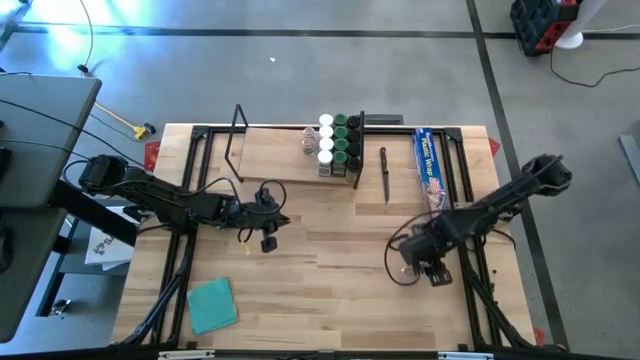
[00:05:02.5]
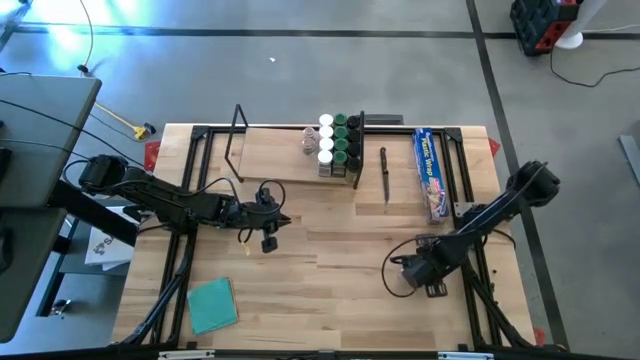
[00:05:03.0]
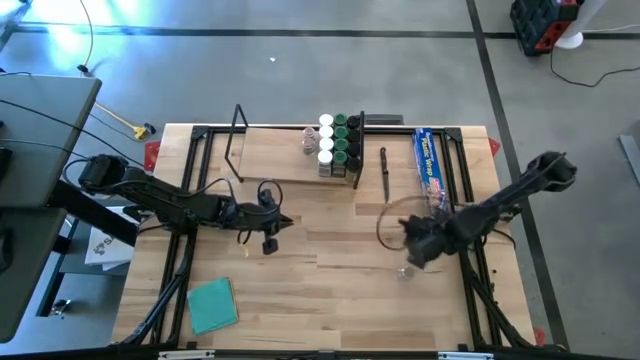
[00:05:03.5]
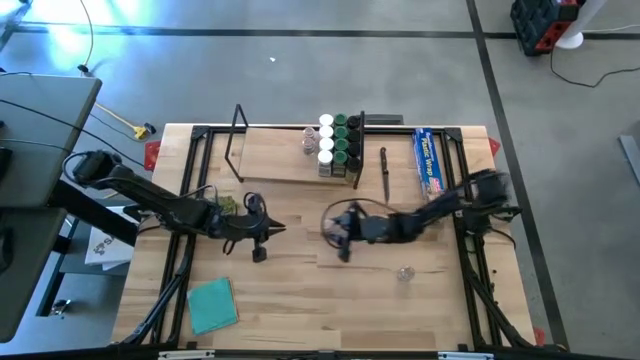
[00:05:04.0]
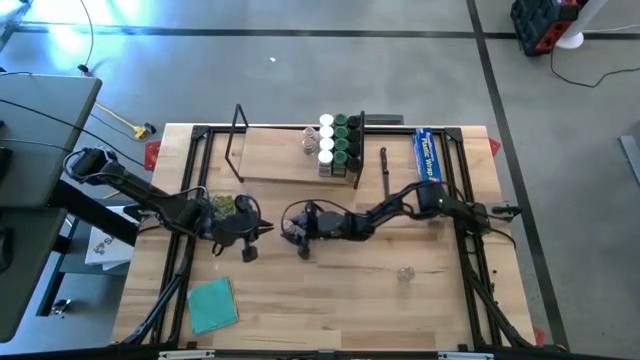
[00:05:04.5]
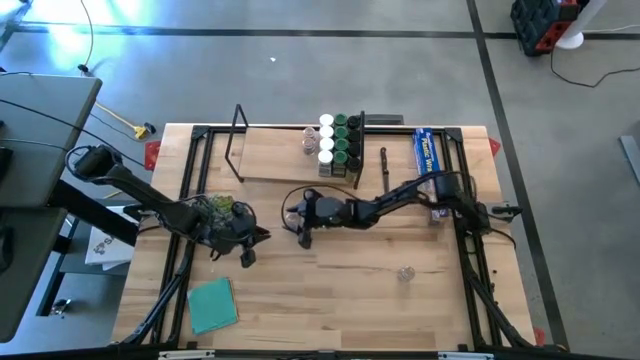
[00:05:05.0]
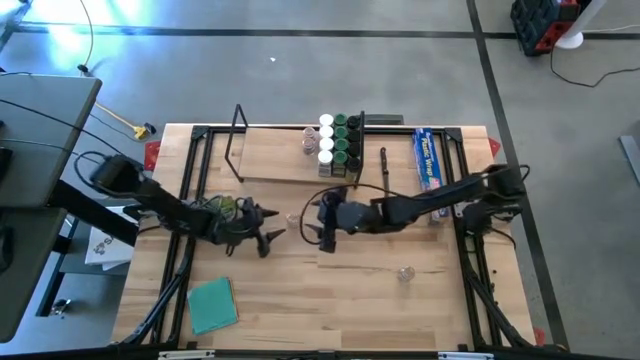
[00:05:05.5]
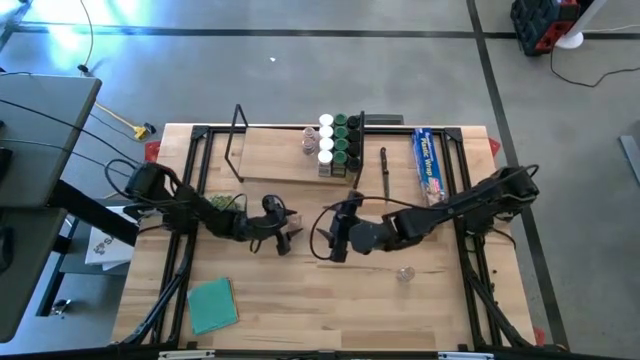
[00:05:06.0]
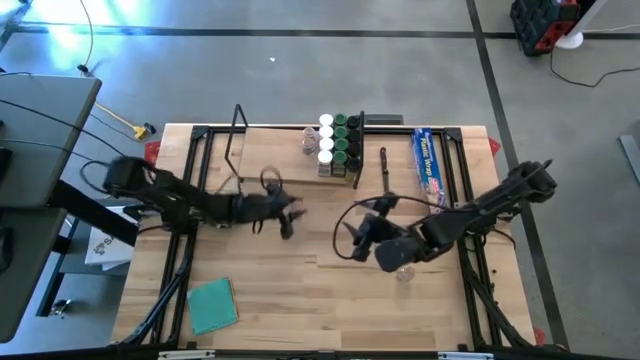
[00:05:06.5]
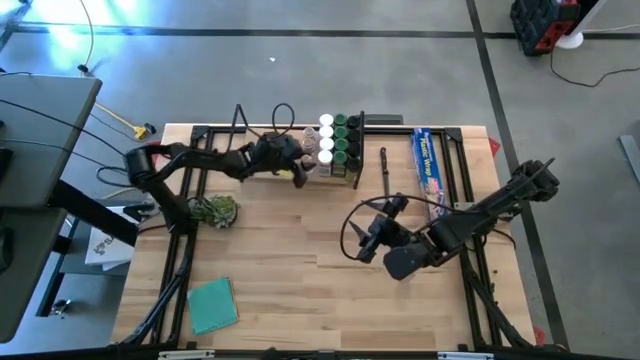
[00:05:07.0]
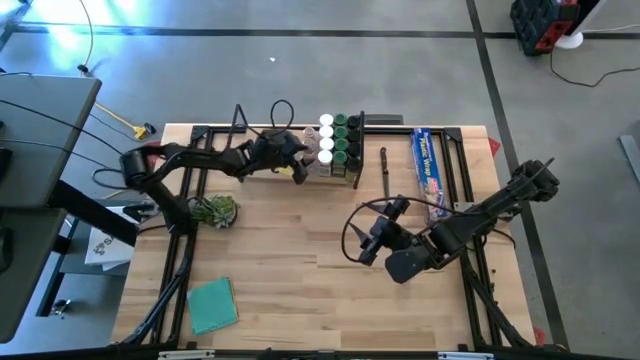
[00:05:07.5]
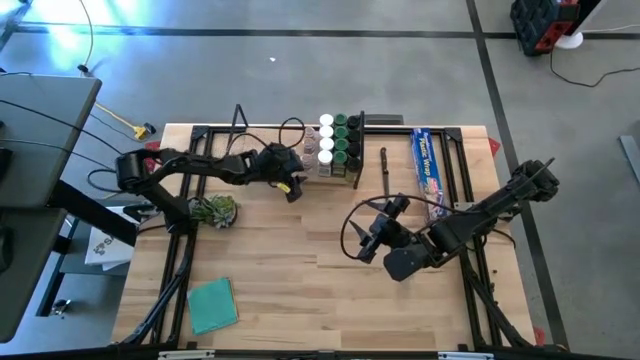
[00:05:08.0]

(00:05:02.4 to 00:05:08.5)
Task: Shelf spices
Put the brown seasoning bottle on the shelf aligned with the other brown seasoning bottle

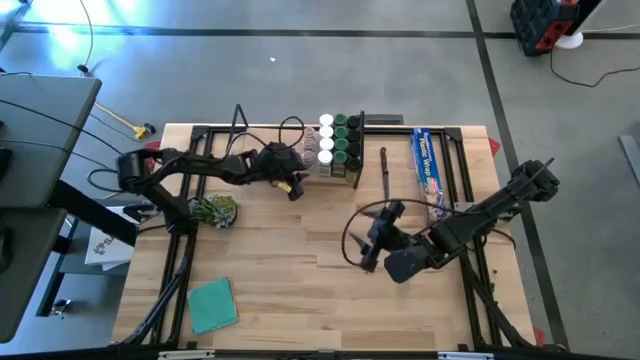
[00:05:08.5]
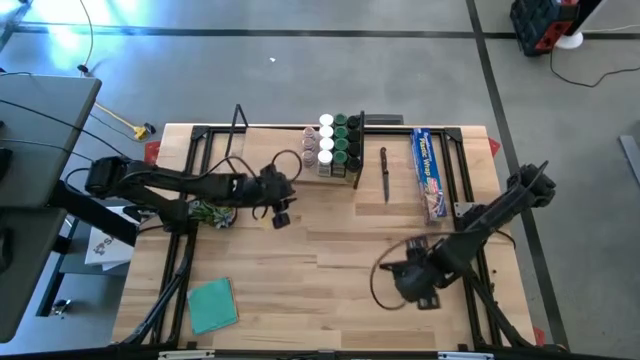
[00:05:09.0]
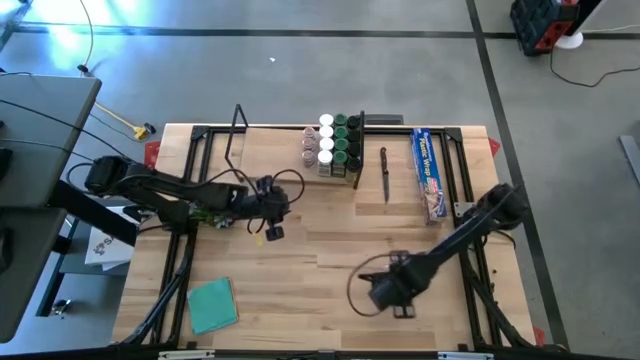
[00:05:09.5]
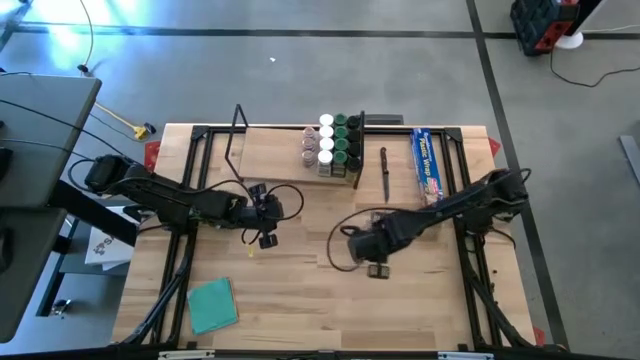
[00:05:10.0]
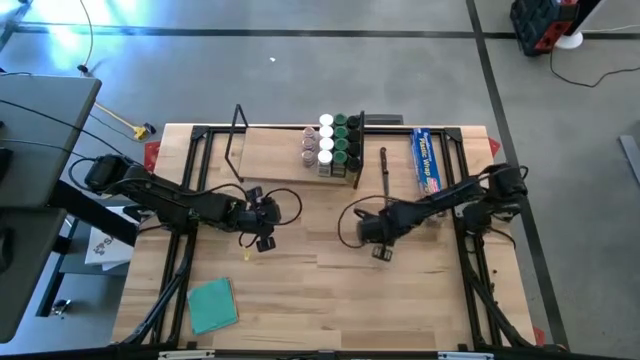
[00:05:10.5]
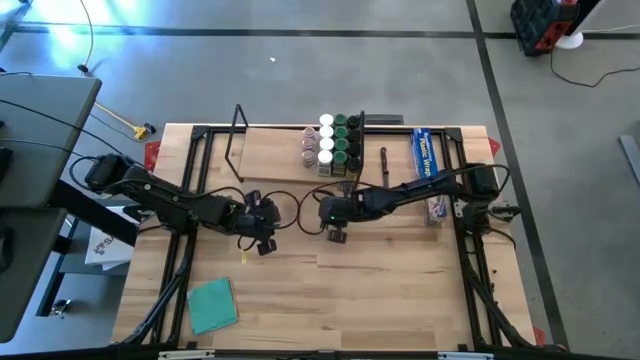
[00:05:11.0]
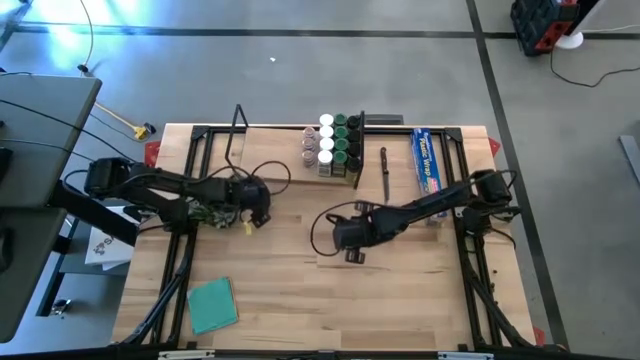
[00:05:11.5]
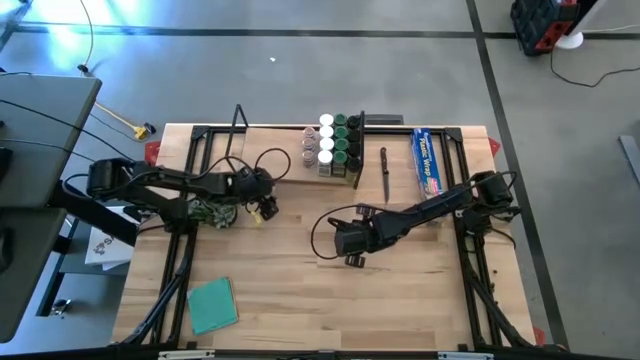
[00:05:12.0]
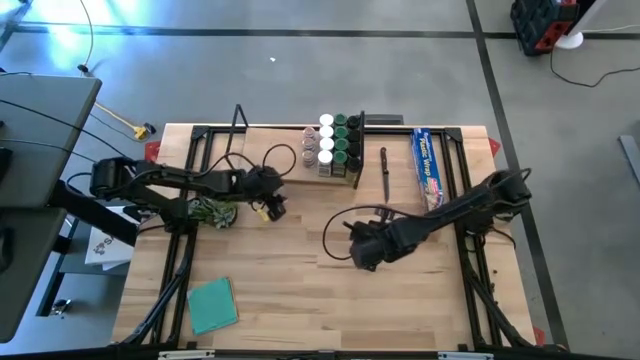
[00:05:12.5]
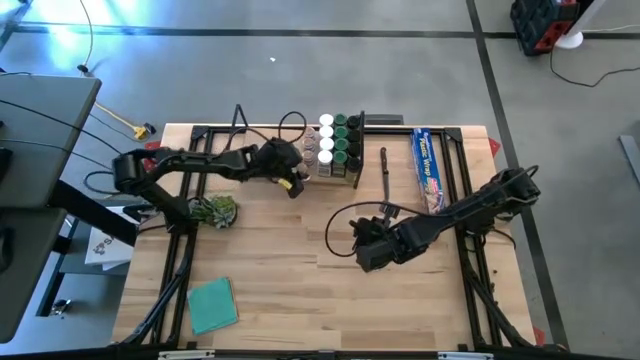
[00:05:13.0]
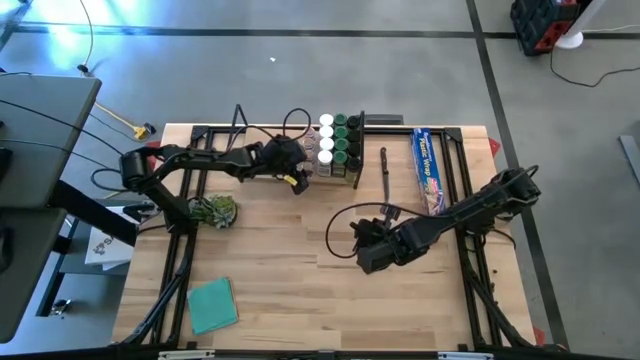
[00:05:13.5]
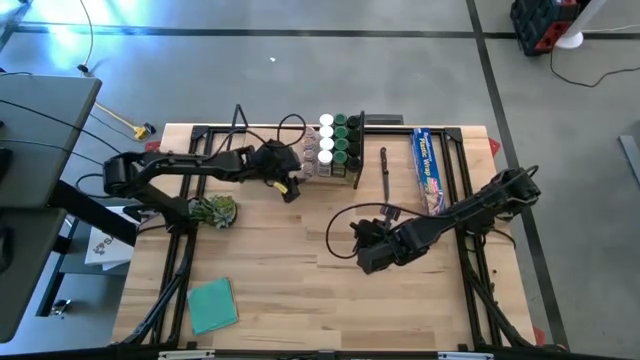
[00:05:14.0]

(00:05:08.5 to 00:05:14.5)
Put the brown seasoning bottle on the shelf aligned with the other brown seasoning bottles

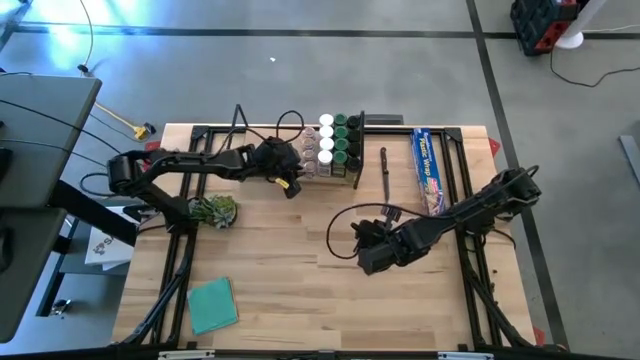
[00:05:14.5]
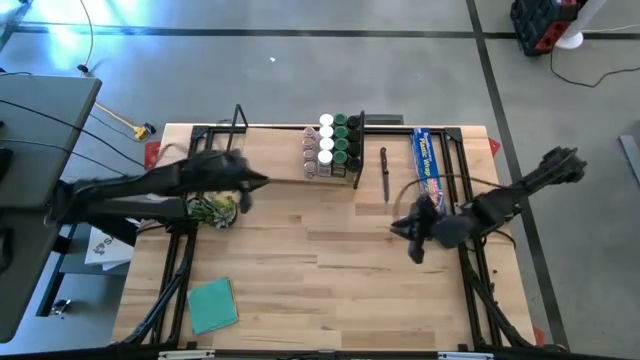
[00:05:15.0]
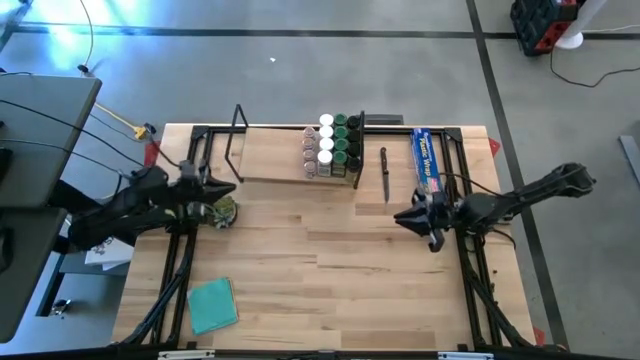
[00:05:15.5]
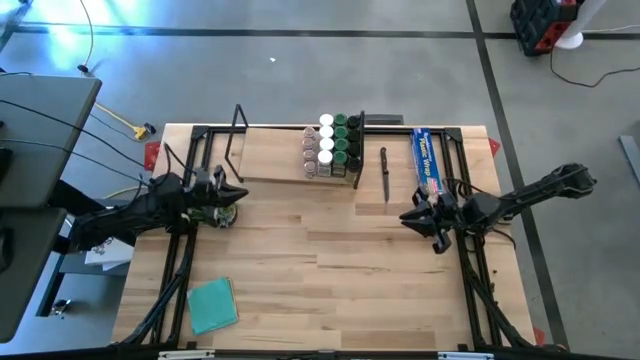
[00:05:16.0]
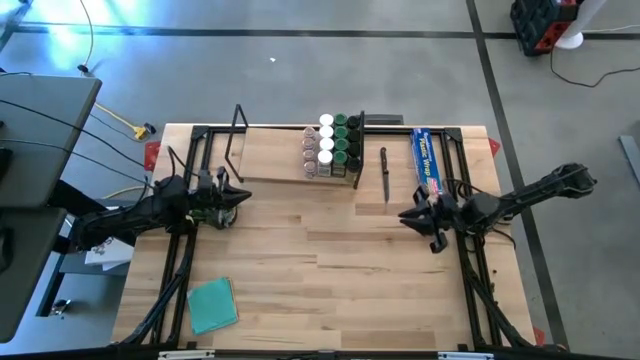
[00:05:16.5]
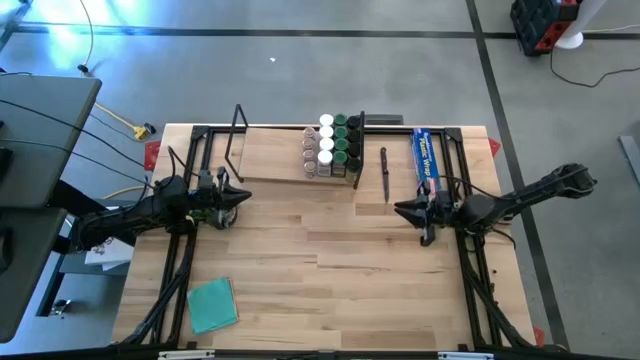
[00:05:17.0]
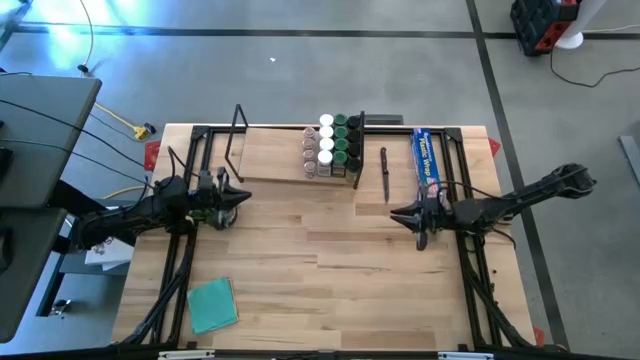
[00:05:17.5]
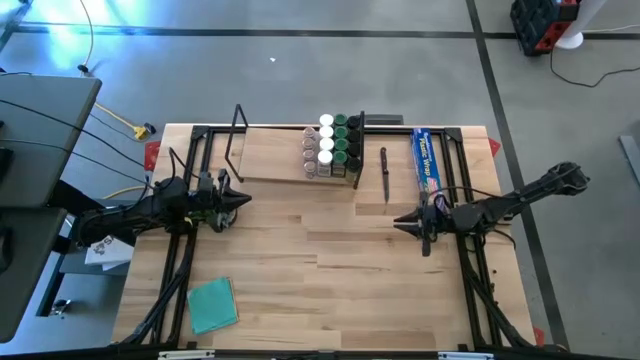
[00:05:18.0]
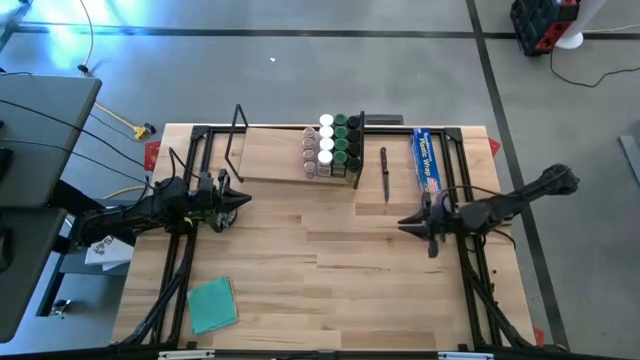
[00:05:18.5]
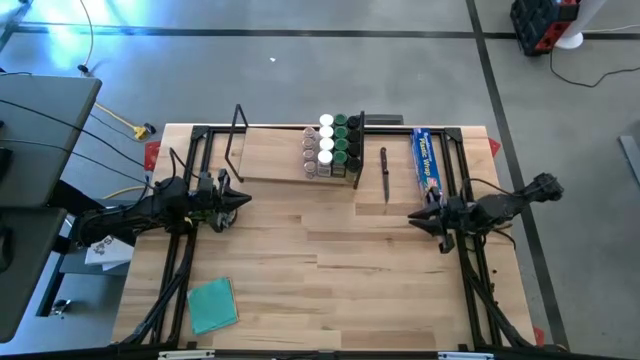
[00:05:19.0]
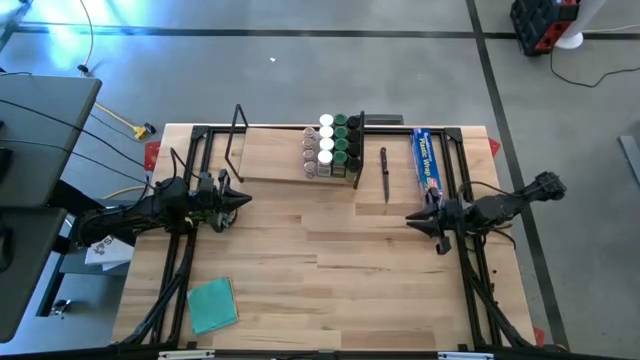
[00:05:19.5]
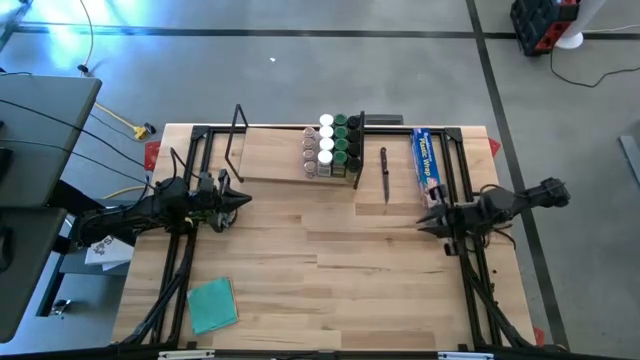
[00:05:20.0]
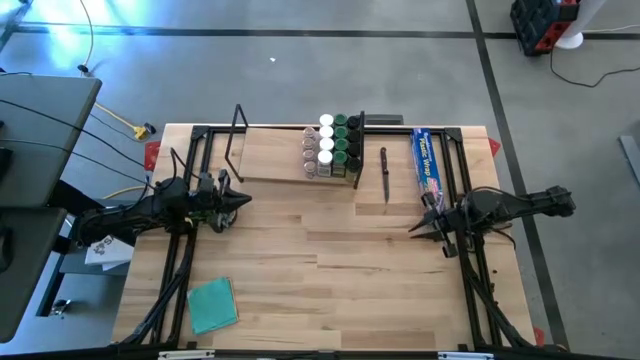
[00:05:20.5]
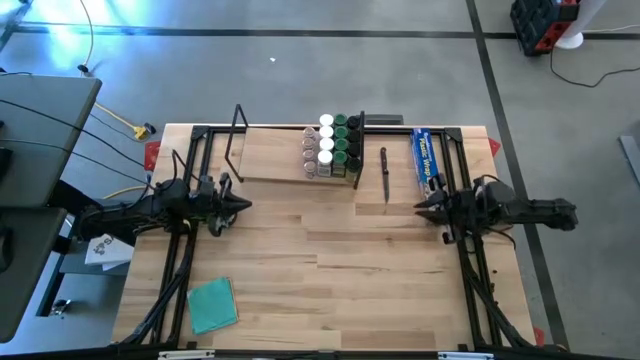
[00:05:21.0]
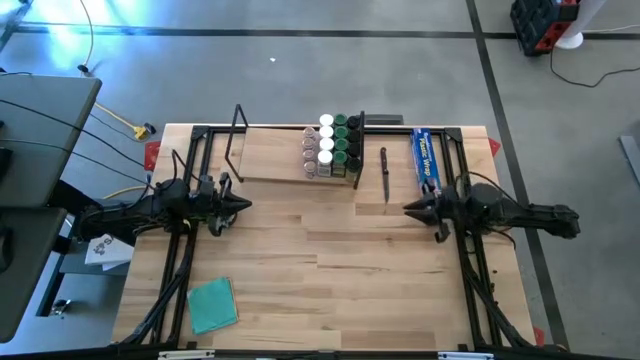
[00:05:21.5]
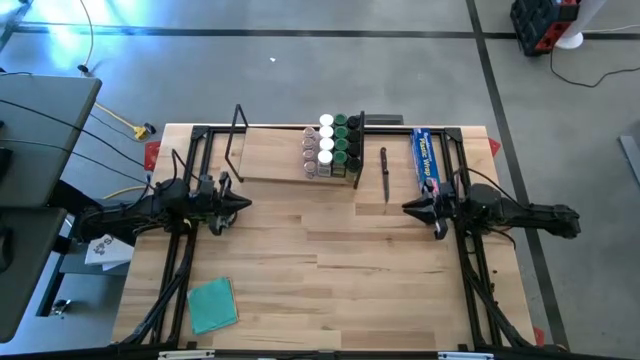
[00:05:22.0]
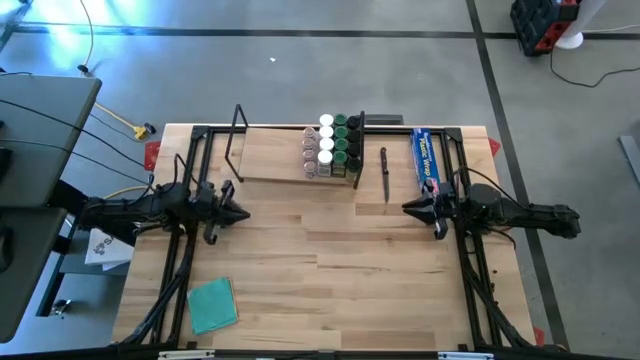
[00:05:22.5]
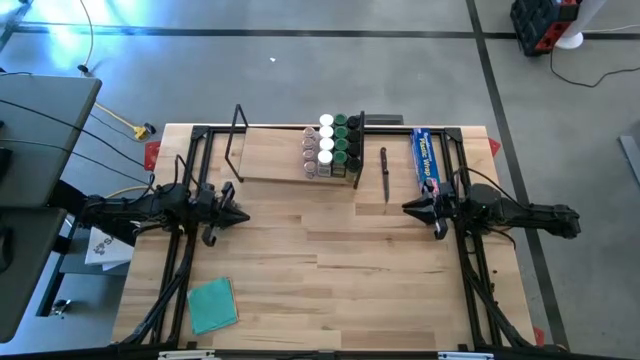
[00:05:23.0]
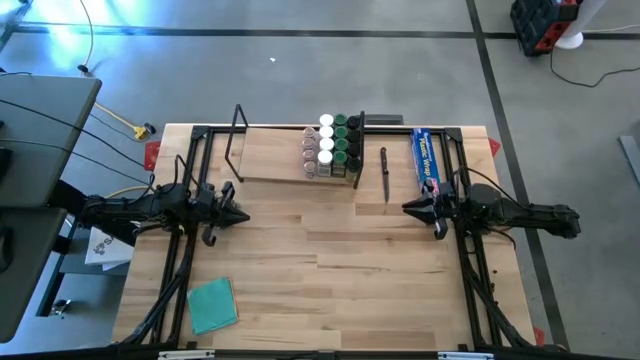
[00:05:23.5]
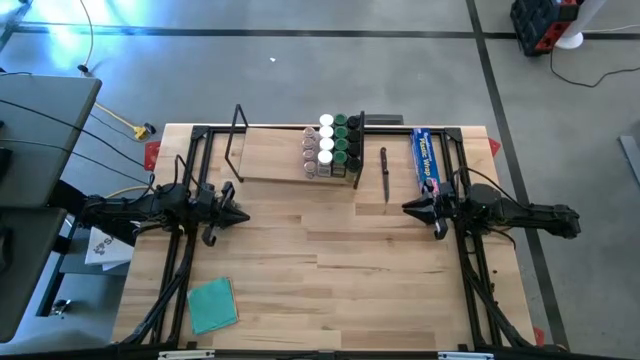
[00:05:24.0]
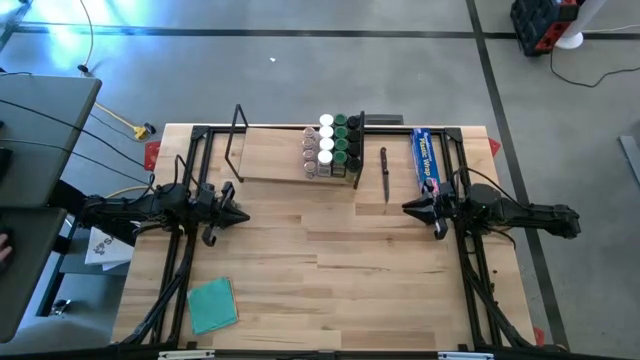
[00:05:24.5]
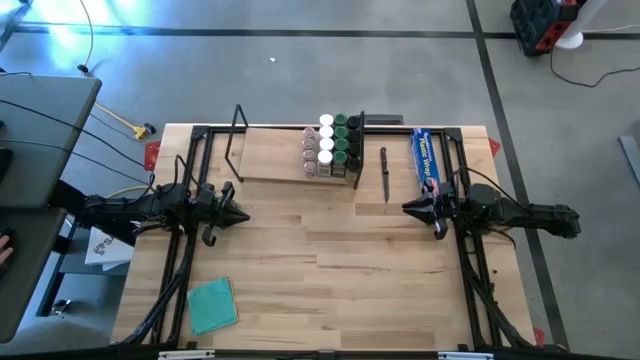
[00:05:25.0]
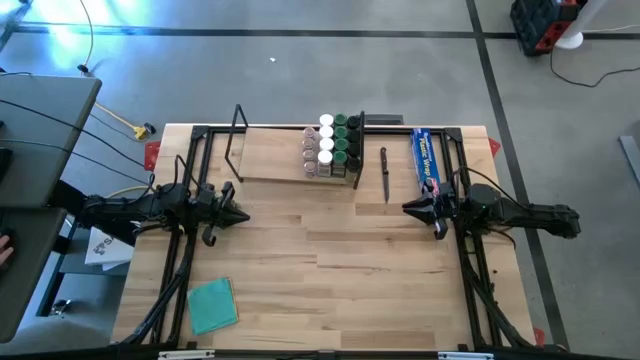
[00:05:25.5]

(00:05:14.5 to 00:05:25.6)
Return to Home Position
